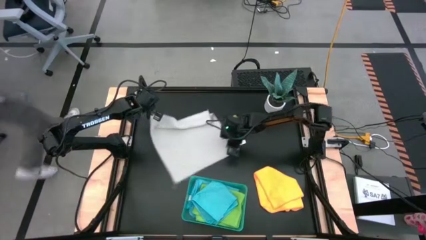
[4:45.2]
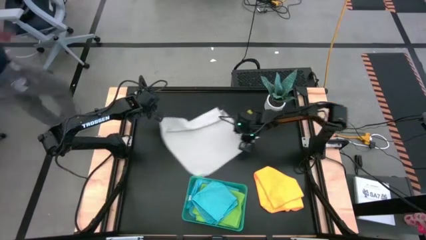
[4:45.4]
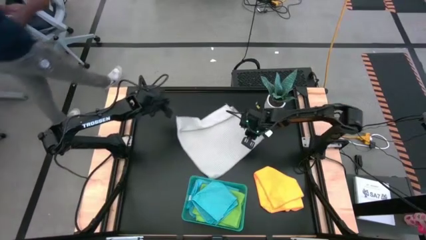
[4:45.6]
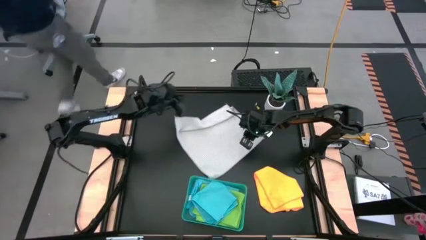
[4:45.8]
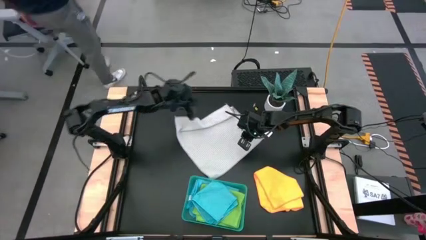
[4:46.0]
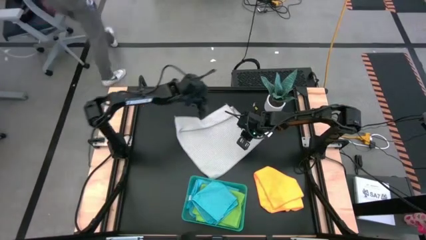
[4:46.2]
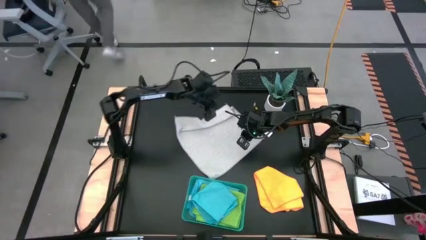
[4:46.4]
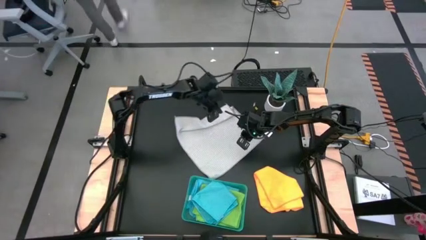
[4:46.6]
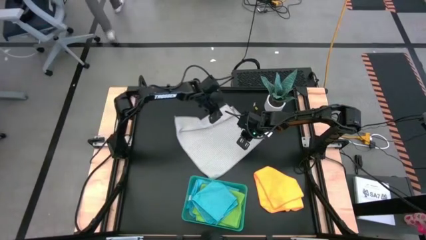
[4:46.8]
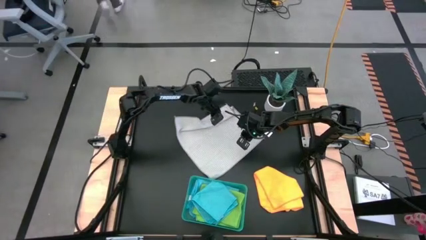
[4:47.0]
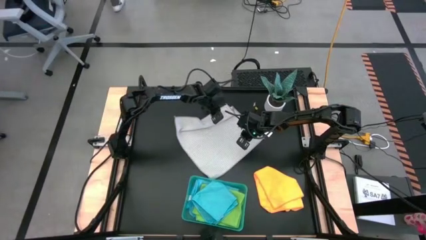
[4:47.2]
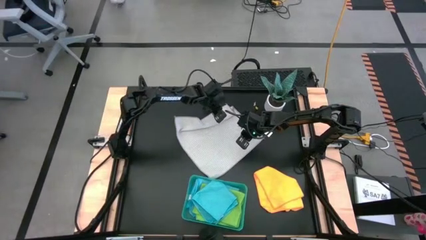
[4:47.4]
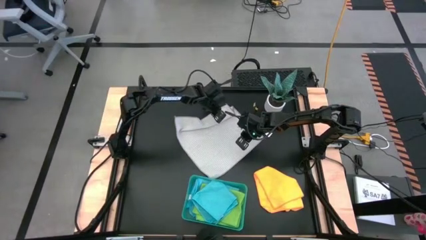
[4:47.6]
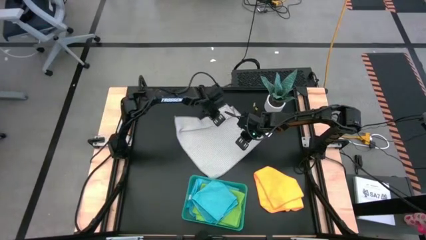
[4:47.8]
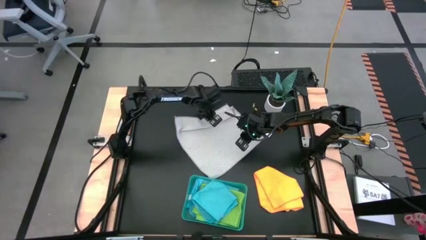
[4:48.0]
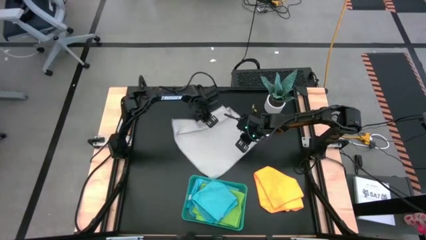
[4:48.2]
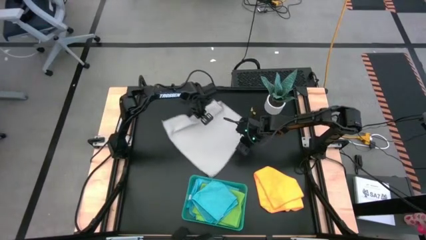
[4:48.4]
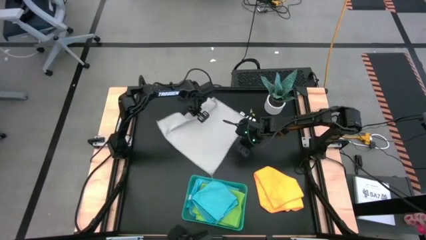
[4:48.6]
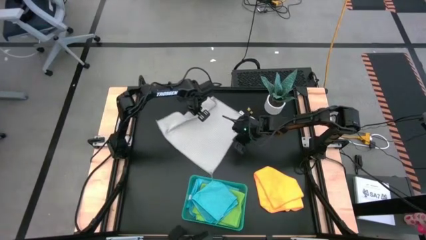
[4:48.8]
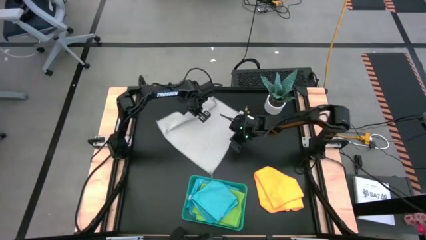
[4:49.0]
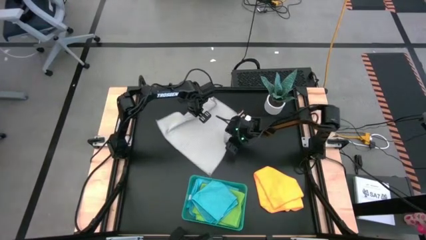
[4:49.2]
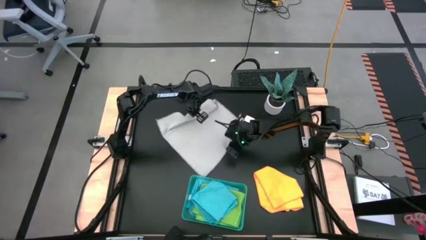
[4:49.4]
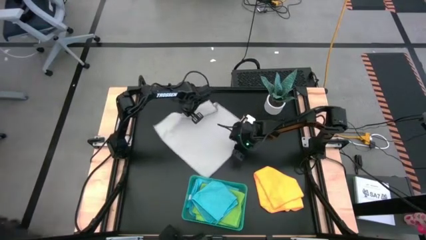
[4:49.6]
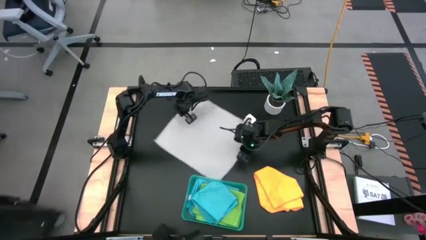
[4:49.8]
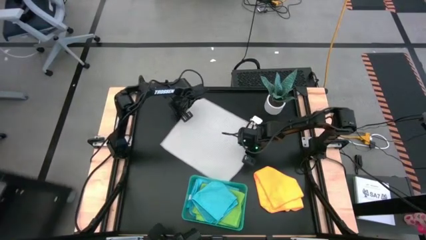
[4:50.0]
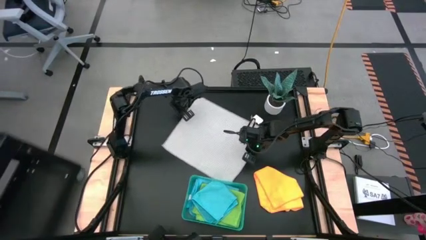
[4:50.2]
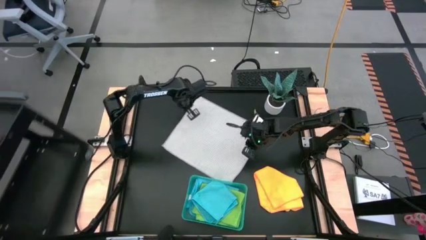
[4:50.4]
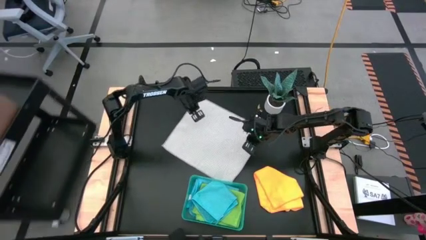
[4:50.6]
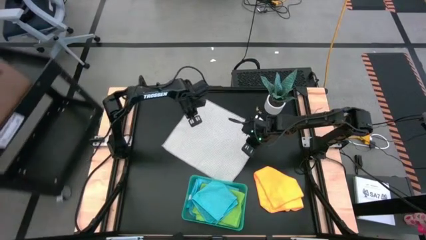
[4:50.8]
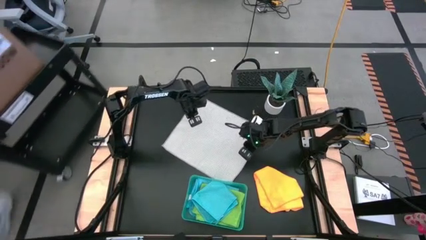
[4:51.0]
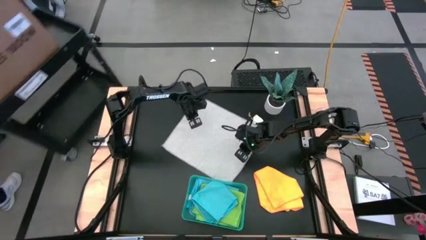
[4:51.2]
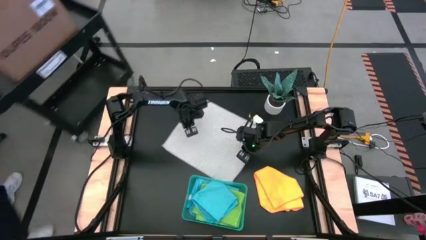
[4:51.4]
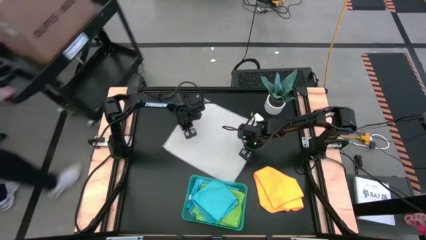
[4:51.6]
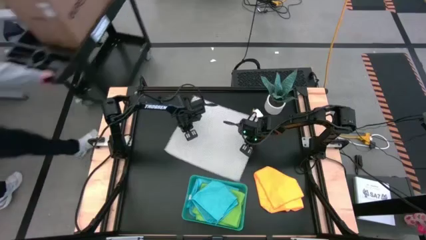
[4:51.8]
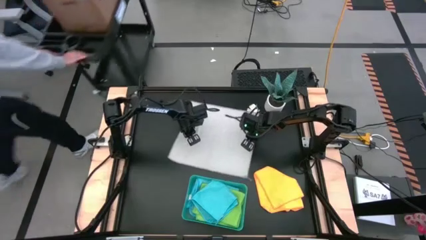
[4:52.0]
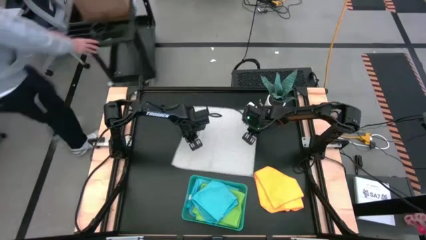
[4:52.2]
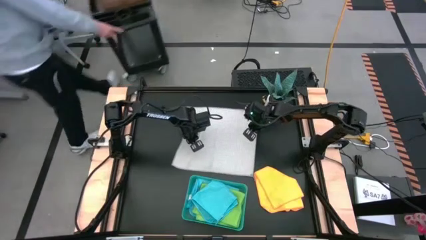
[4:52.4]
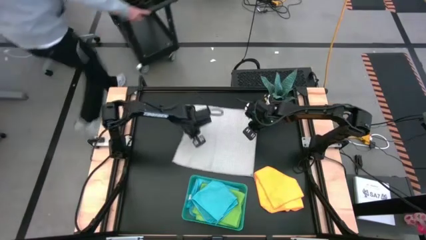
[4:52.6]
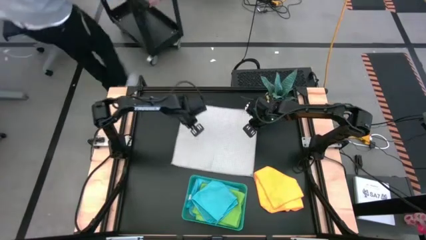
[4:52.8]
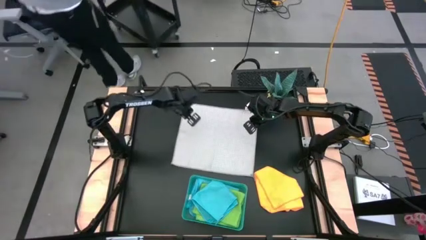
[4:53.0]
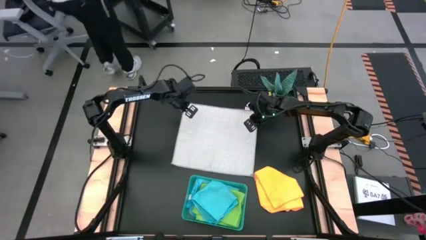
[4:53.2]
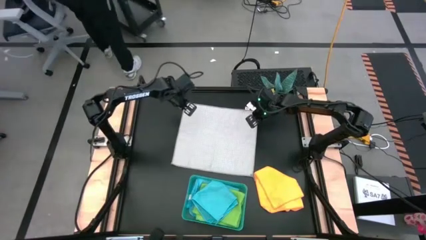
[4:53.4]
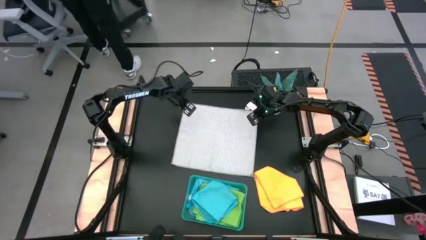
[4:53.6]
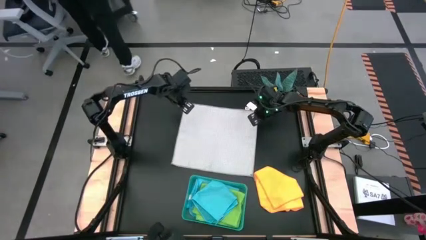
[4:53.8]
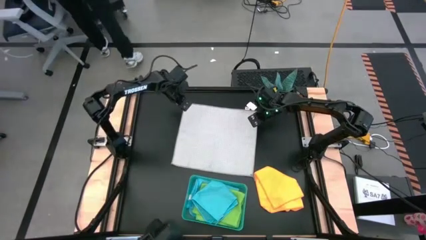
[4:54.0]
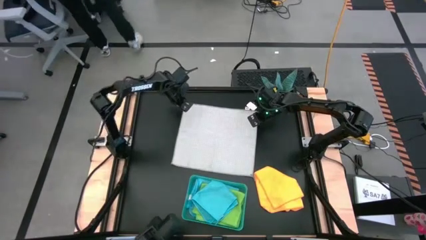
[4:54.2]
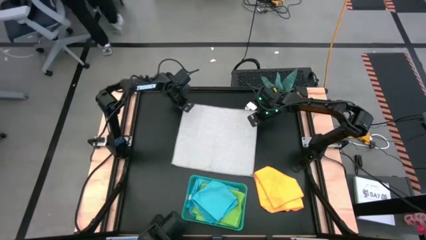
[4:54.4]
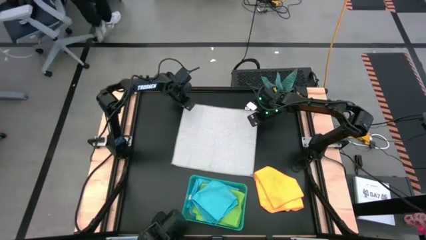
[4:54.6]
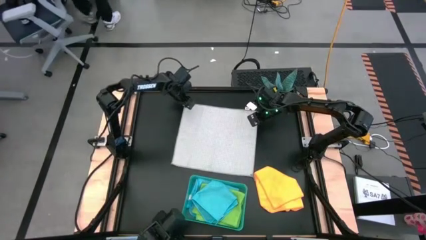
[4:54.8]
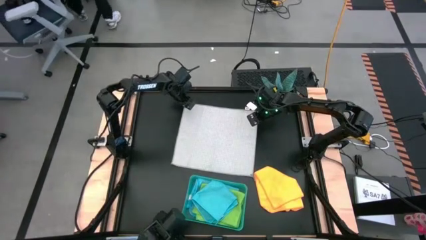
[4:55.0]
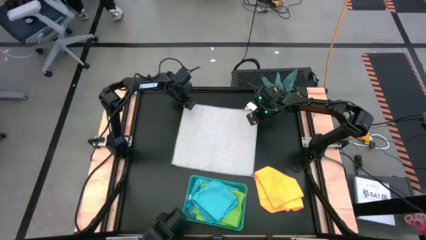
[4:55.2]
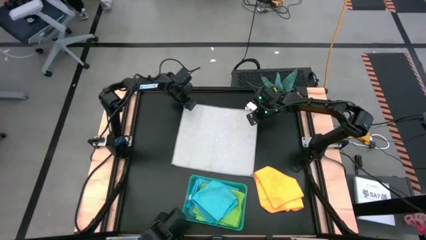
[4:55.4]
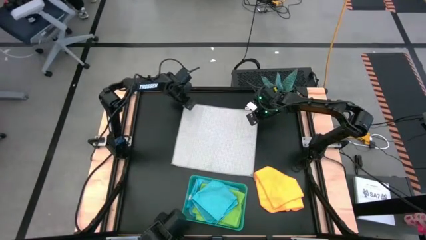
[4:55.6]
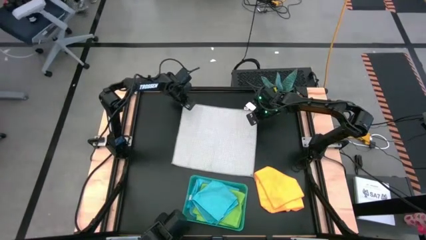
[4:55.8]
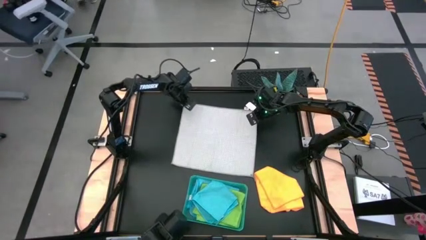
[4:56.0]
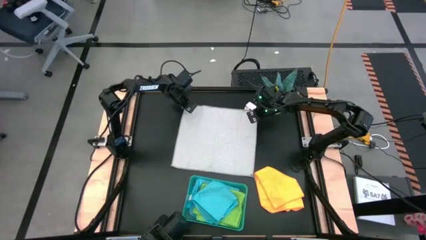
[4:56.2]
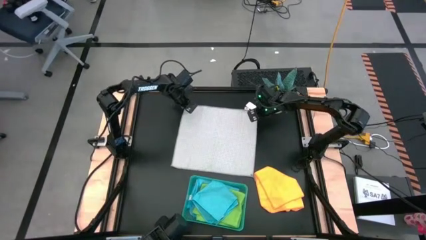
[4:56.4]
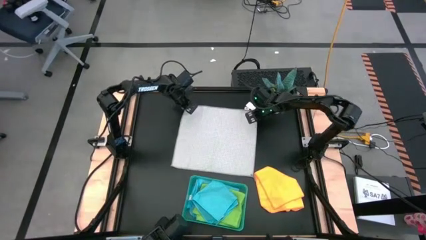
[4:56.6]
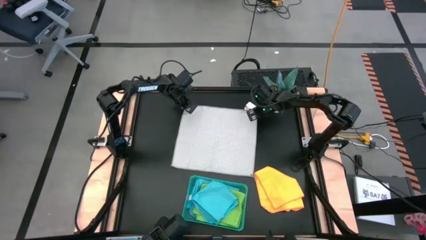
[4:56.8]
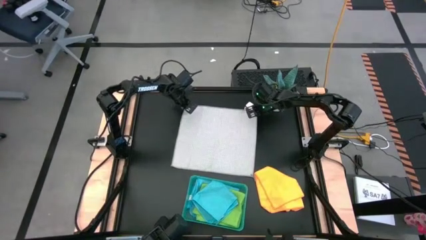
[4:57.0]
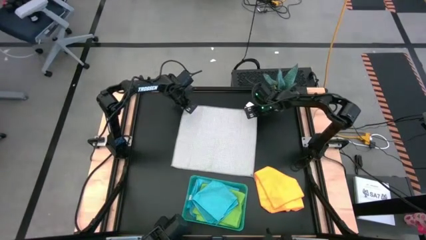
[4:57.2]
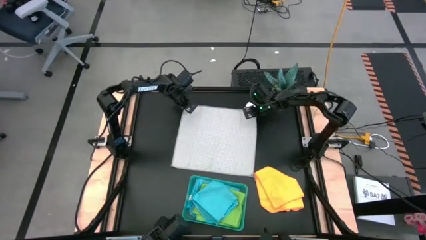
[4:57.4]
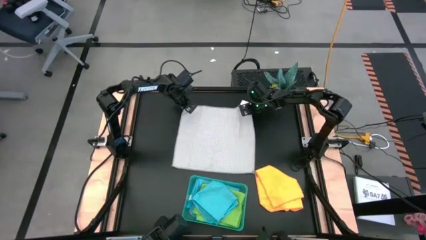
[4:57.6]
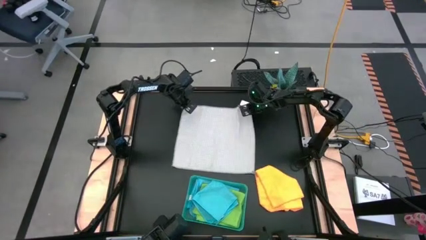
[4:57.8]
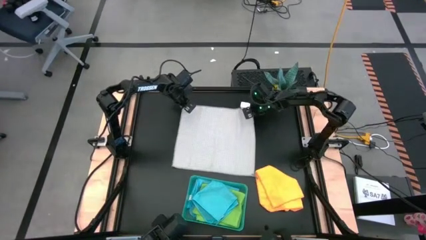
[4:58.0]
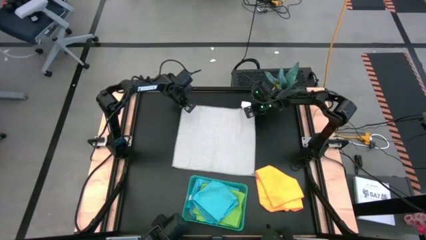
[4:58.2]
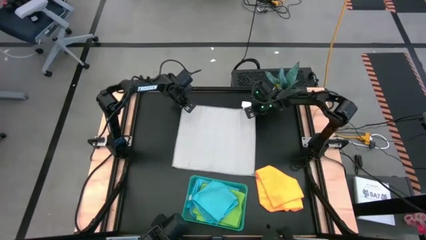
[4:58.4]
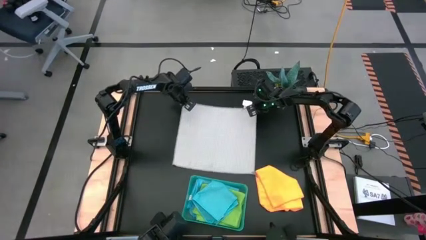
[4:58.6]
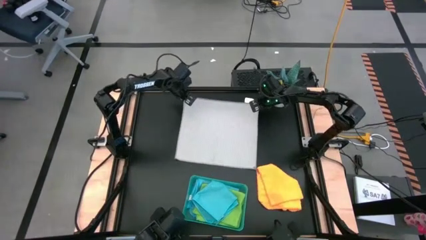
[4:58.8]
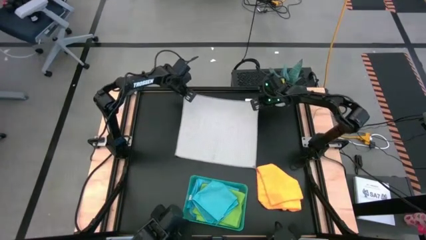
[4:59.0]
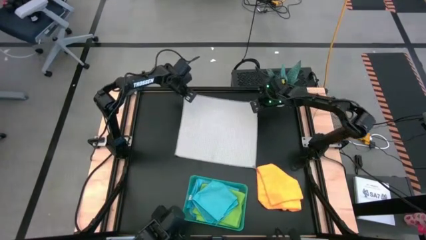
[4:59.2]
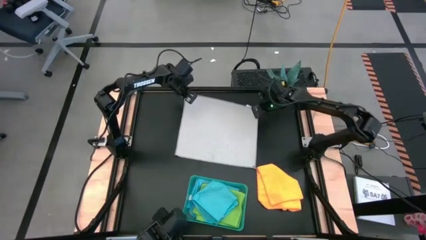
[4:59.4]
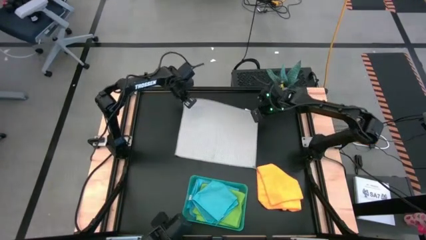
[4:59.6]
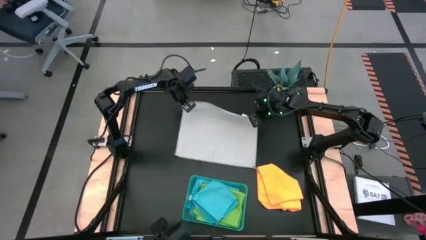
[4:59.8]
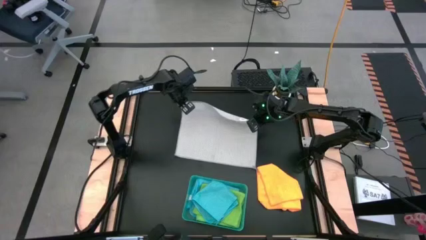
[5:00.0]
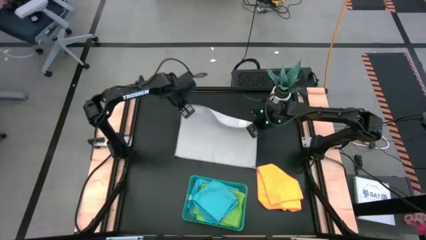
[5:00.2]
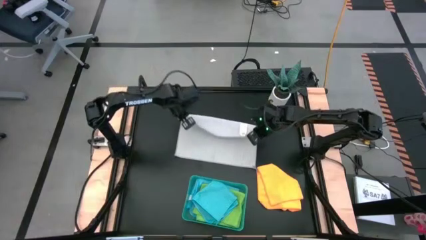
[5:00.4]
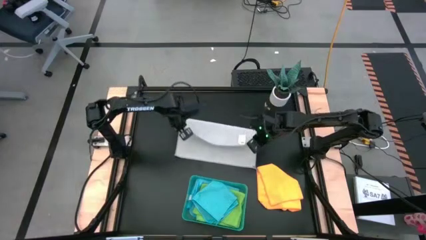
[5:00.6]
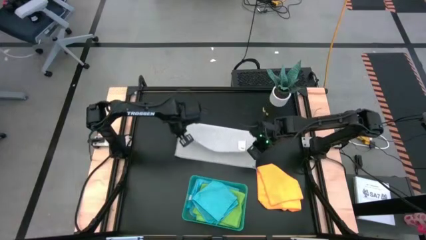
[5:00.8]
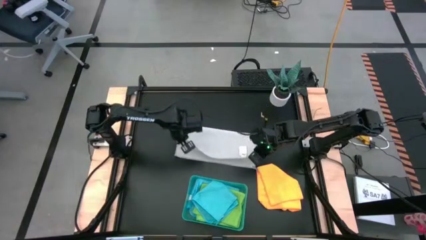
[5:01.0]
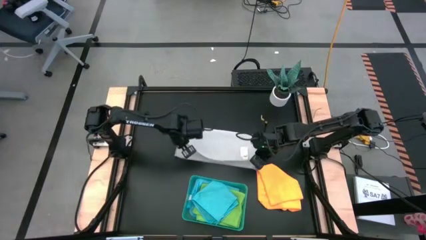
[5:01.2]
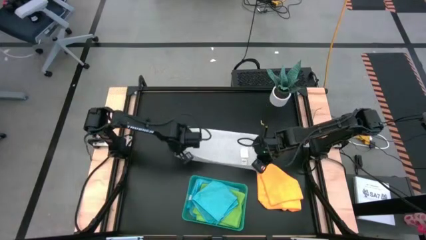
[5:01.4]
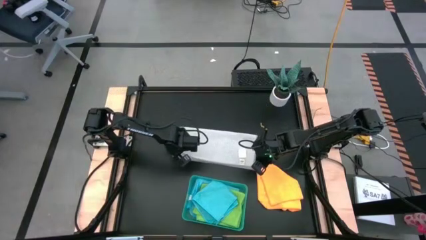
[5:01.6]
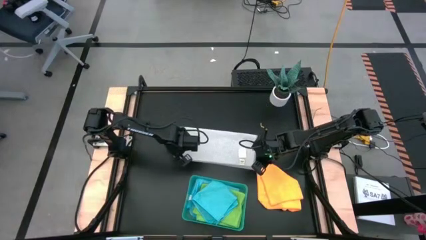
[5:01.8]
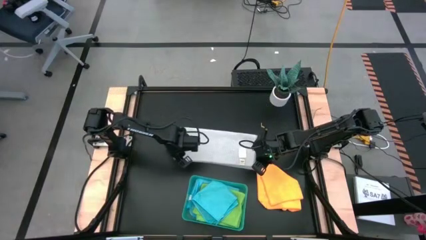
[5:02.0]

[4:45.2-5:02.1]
Task: Fold microfiber towels
Fold the gray microfiber cloth
